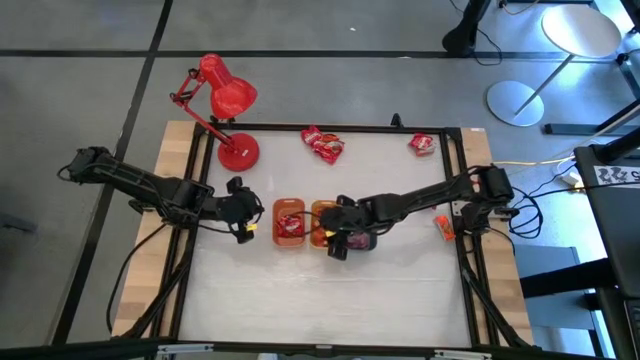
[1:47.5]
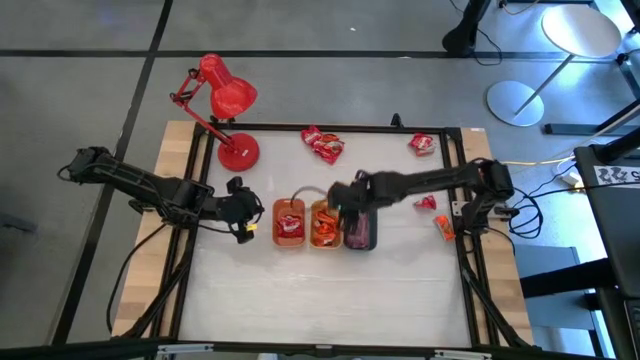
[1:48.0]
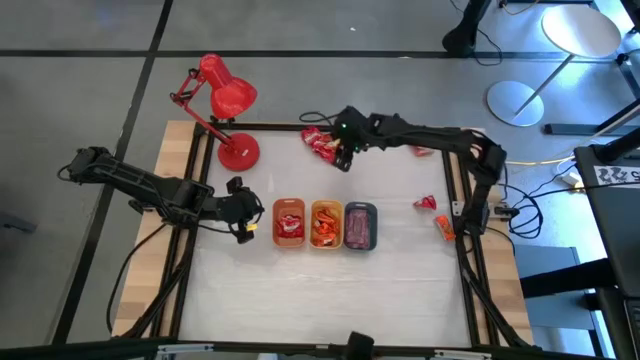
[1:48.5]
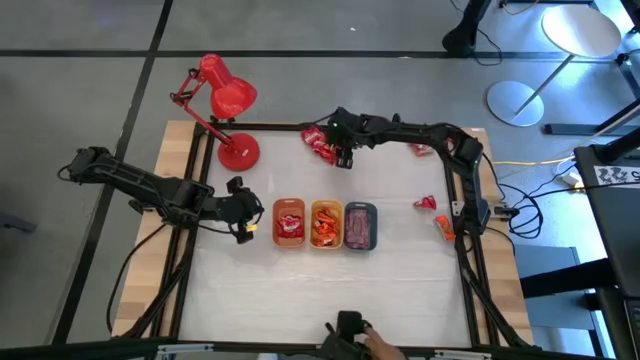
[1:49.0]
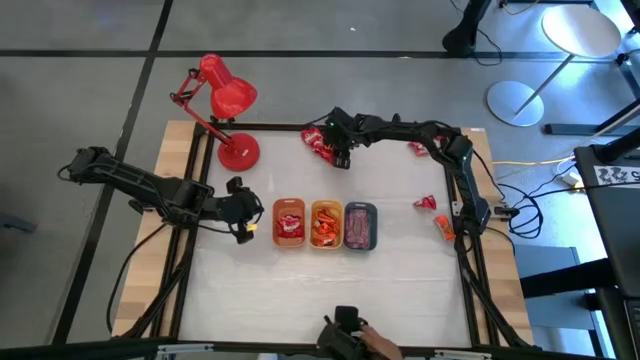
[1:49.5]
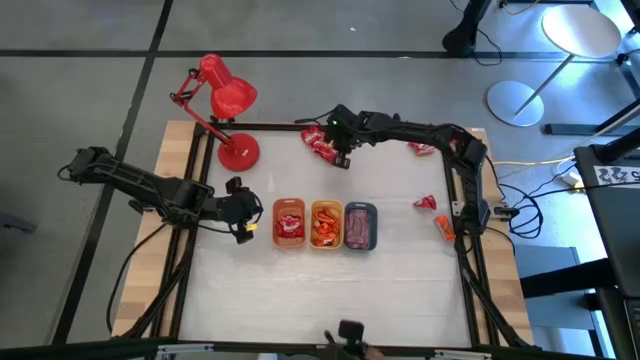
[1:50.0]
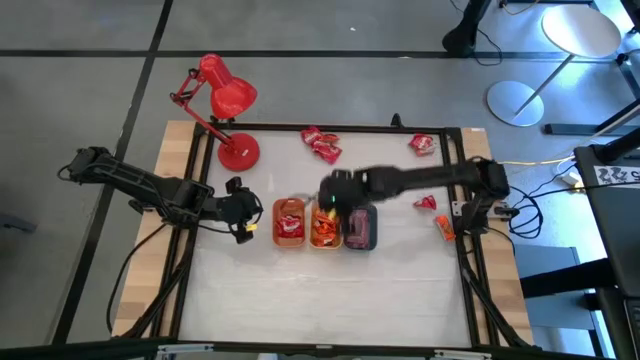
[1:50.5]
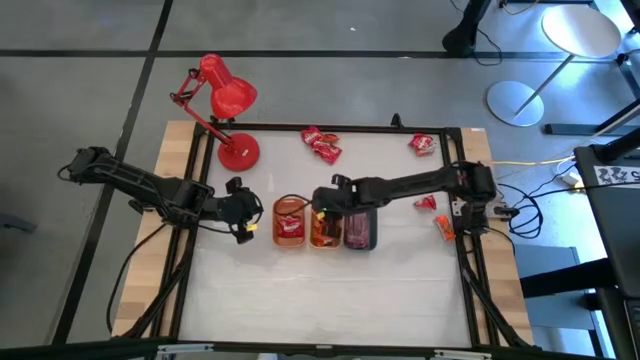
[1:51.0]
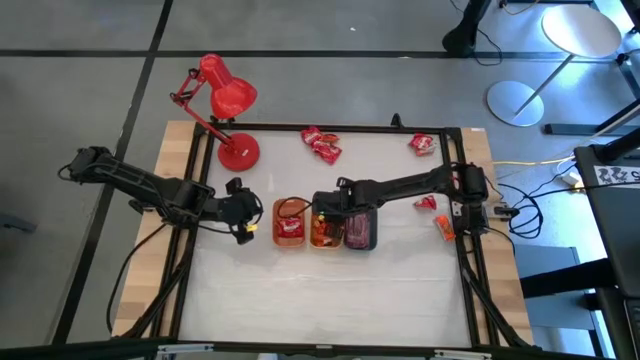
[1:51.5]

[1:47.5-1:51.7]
Task: Sort candy
Put the orange candy into the yellow bin

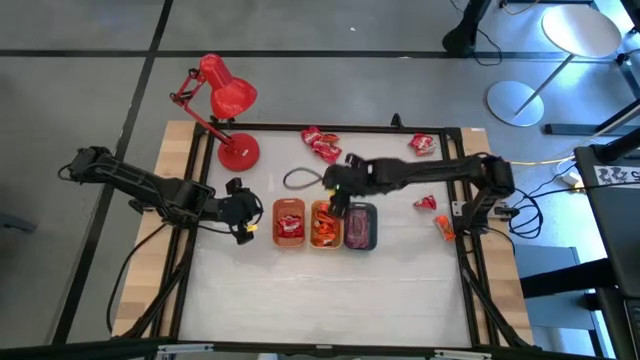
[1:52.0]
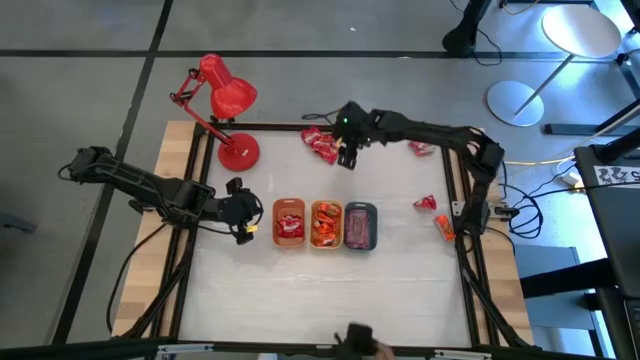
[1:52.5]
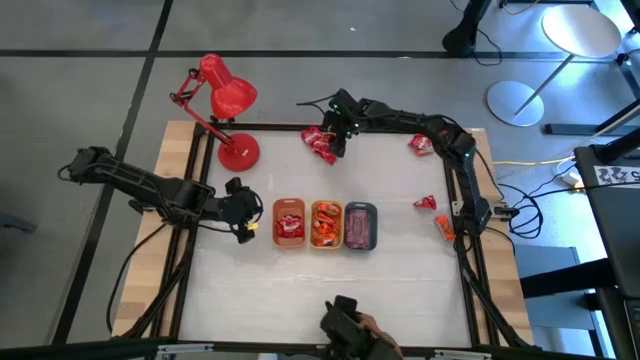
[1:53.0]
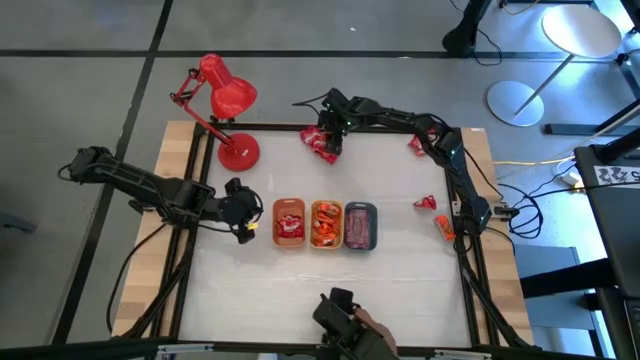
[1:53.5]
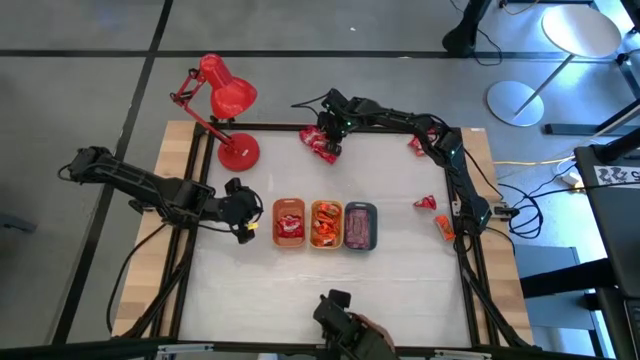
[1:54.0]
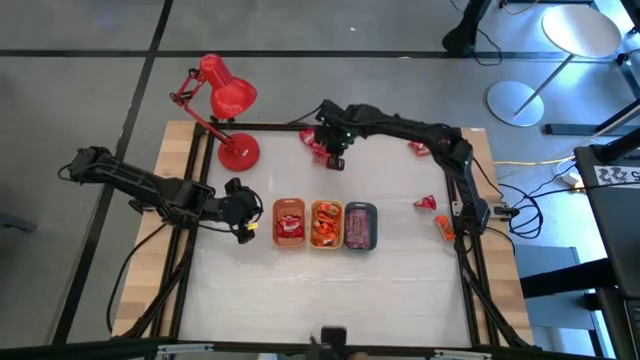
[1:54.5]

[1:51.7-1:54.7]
Put the orange candy into the yellow bin

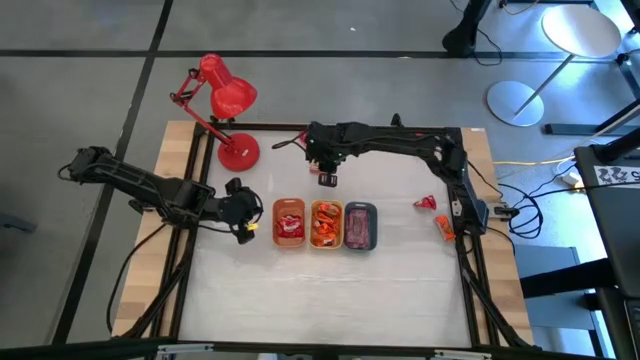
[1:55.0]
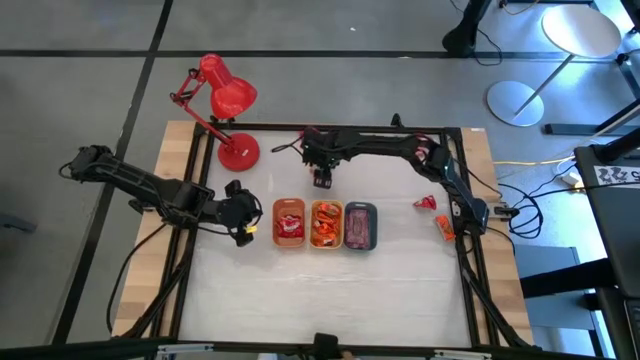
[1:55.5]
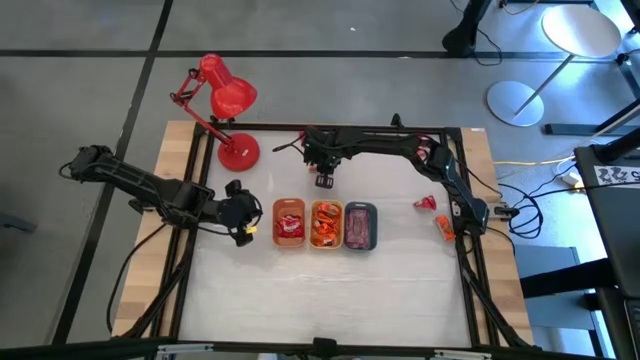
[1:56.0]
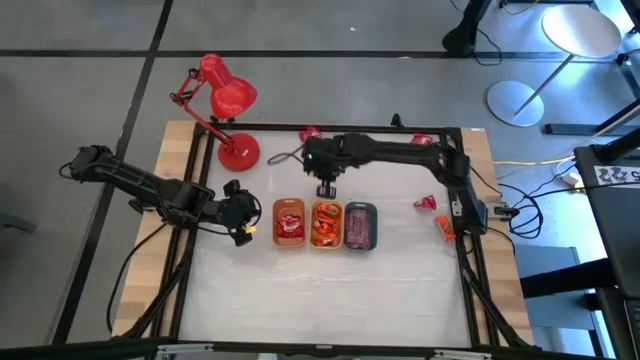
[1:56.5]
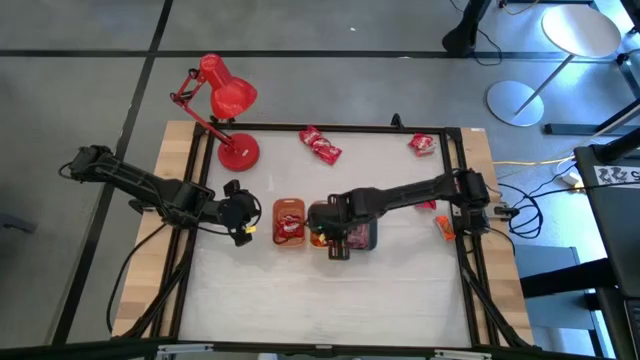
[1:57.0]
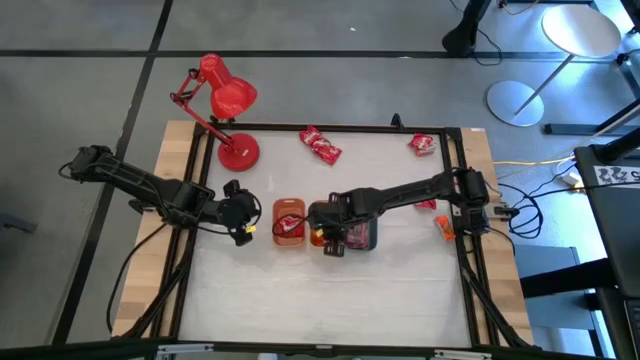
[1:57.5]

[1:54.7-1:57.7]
Put the orange candy into the yellow bin

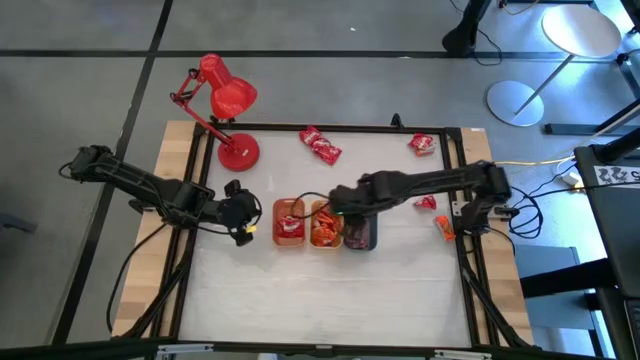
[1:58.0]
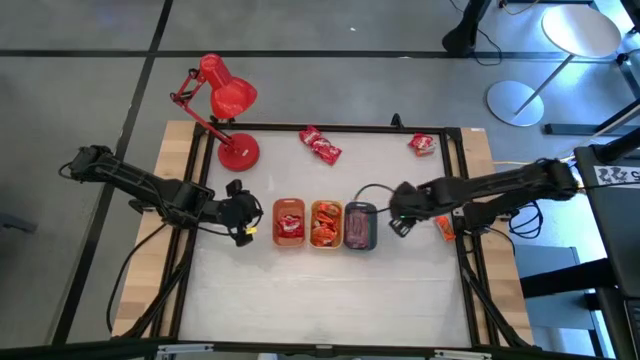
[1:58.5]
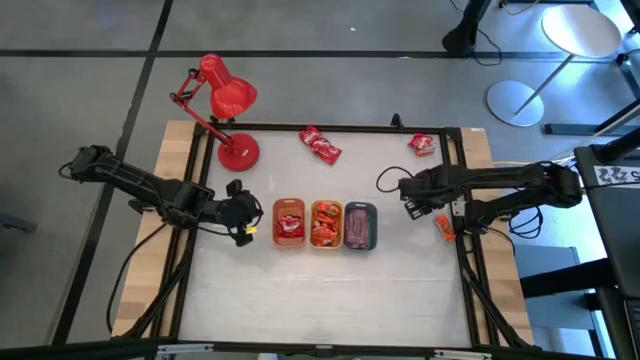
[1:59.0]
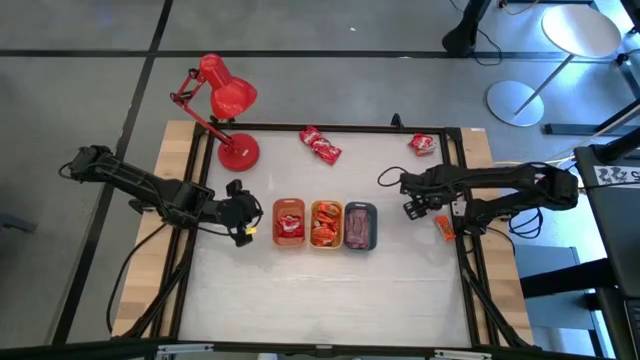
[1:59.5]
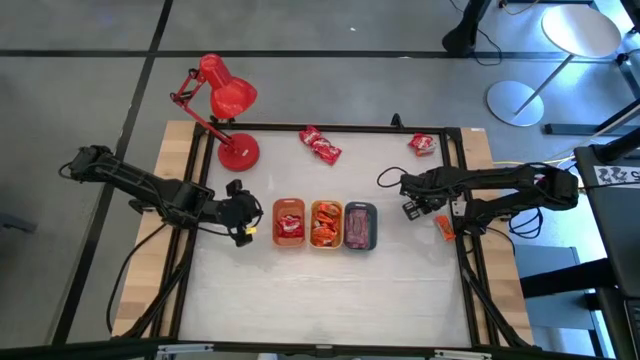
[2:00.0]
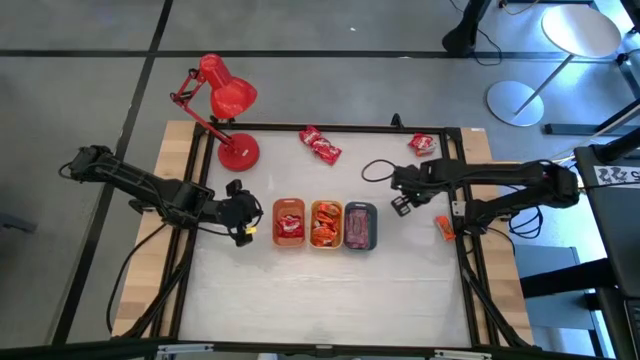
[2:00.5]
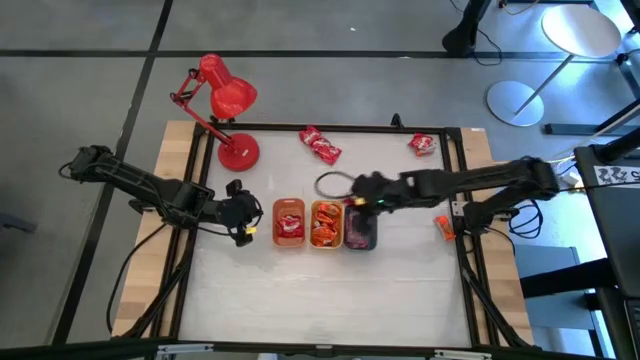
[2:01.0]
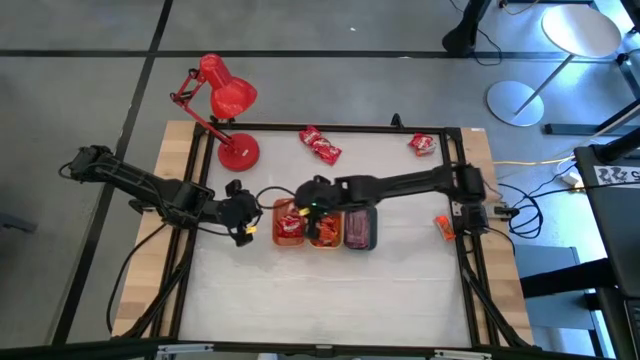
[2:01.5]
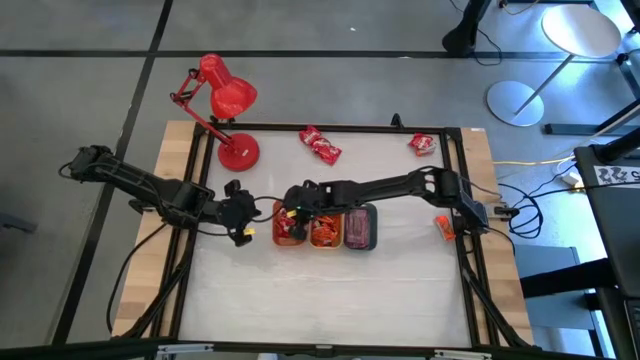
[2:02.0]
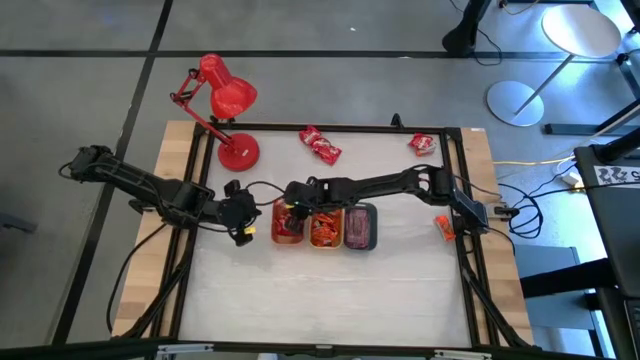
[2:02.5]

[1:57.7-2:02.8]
Put the red candy into the orange bin

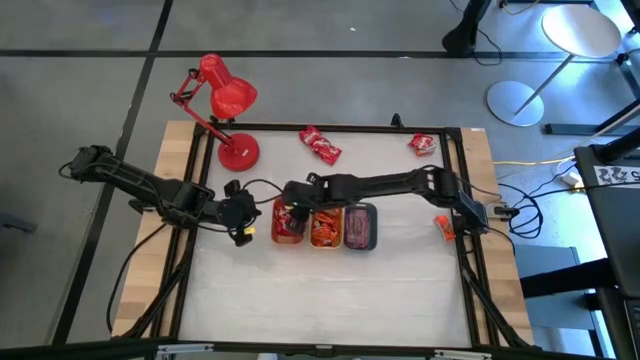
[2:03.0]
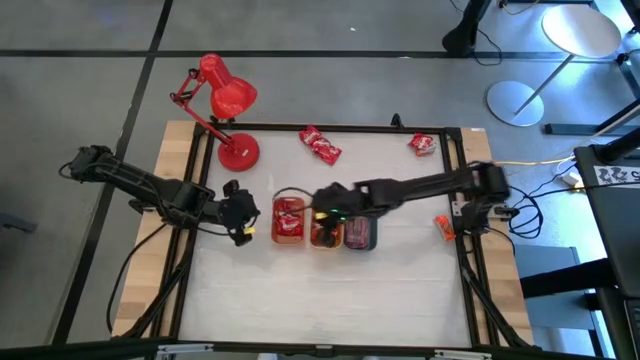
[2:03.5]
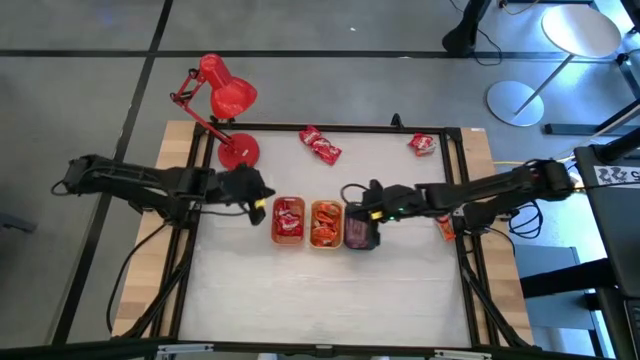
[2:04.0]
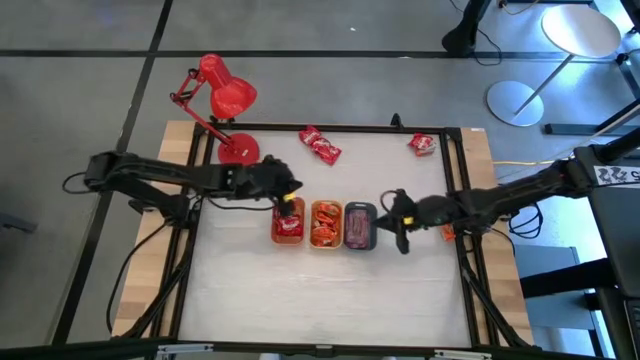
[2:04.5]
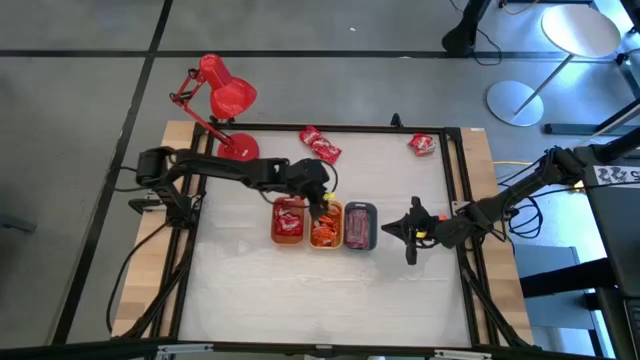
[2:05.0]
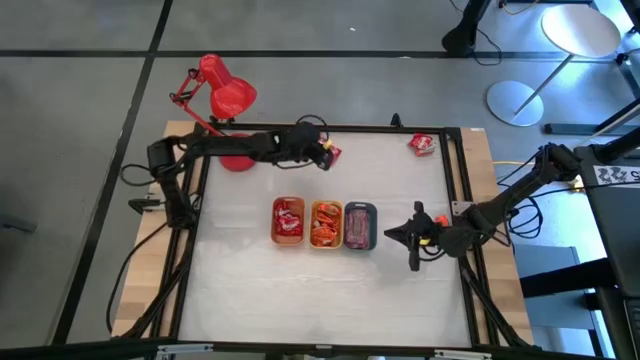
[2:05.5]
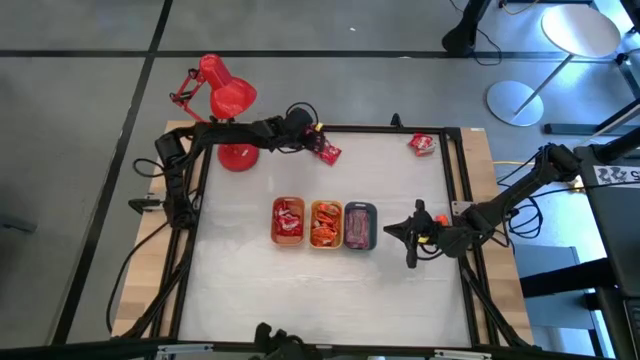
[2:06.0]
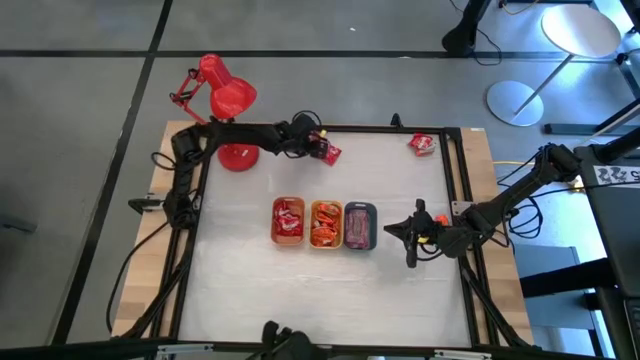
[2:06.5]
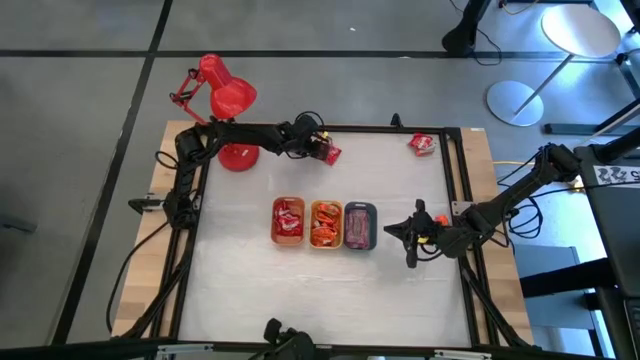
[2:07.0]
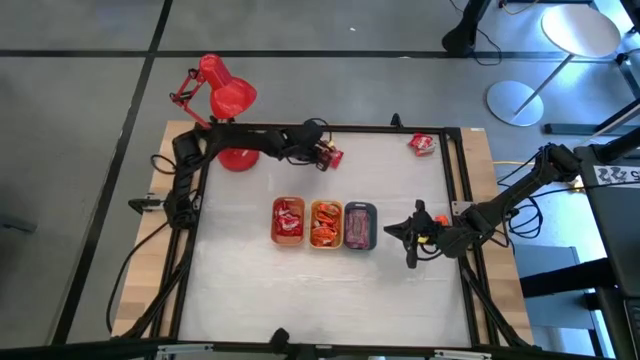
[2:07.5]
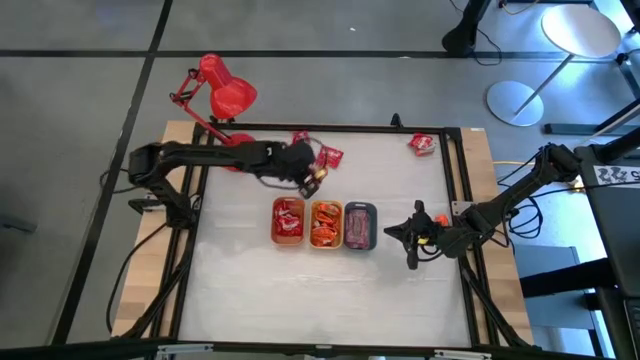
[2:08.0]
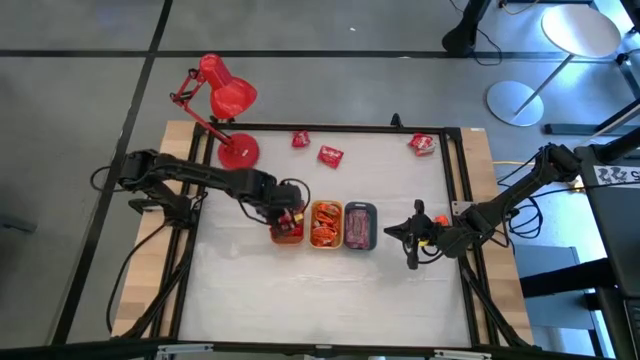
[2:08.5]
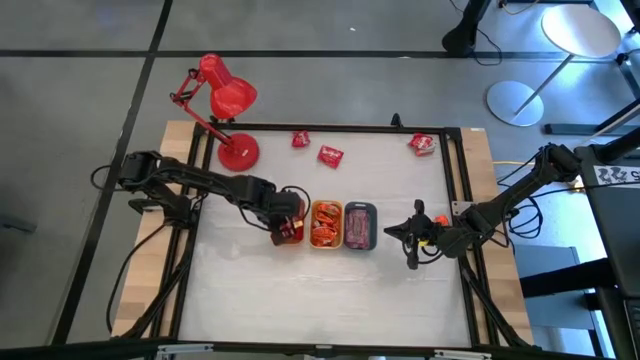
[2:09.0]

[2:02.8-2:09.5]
Put the red candy into the orange bin
